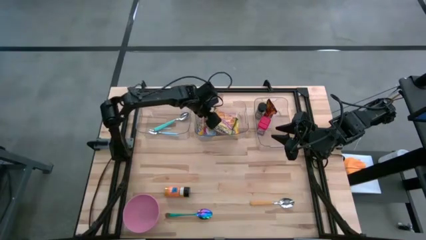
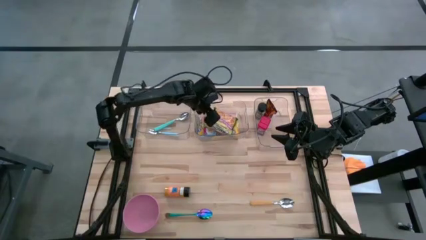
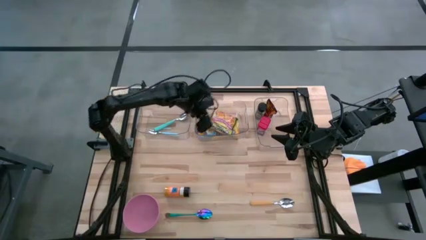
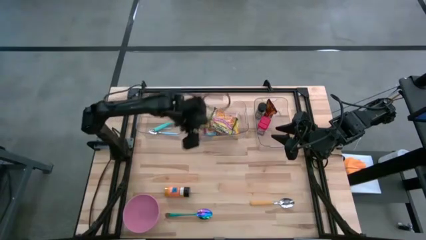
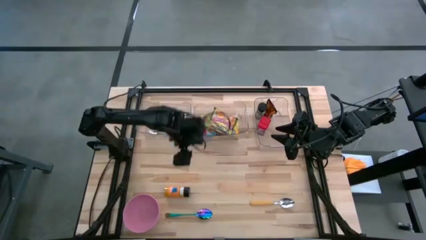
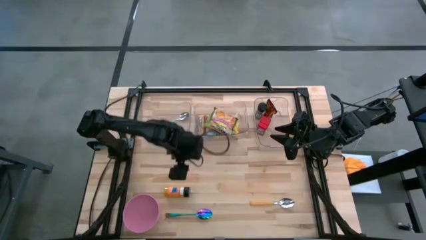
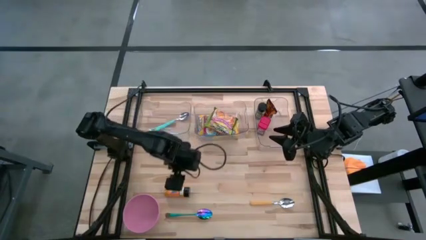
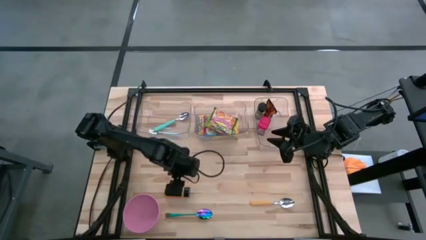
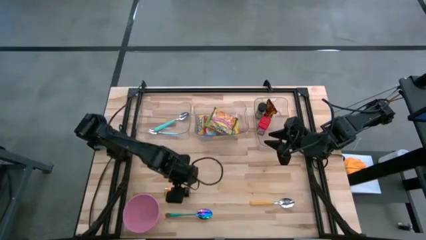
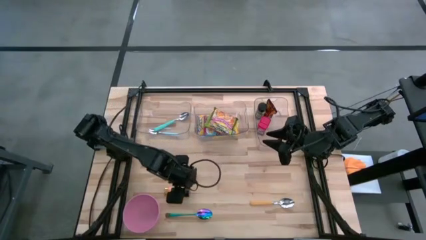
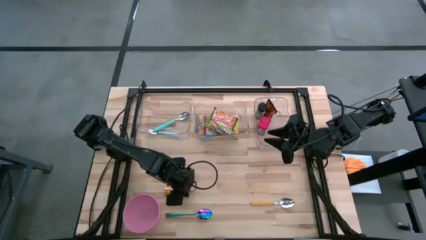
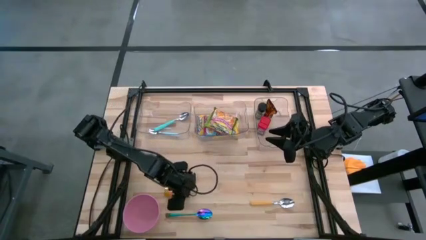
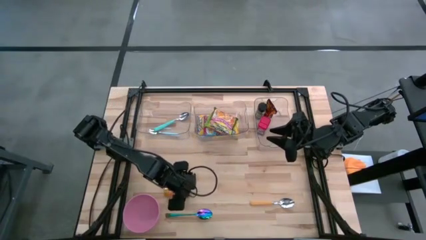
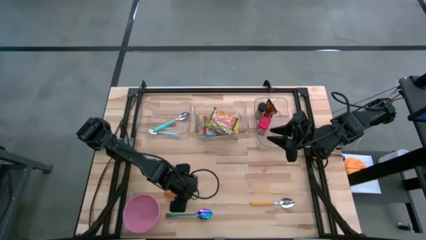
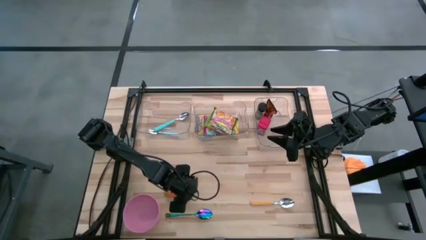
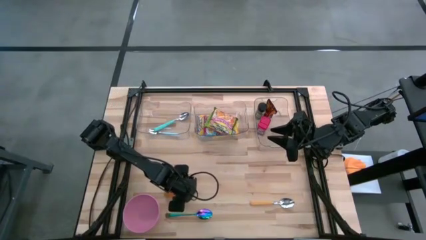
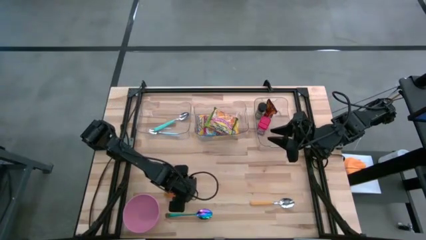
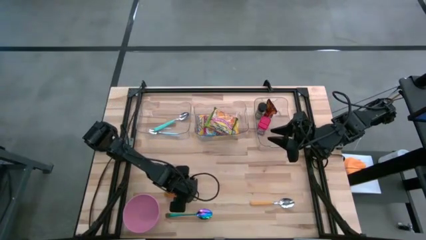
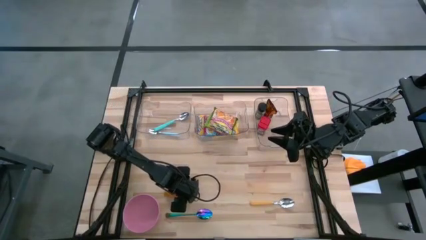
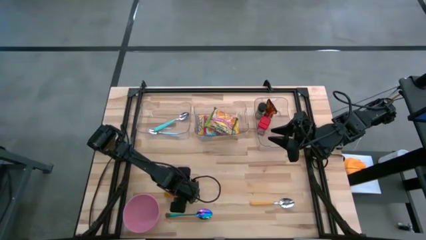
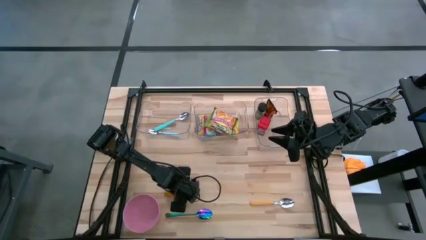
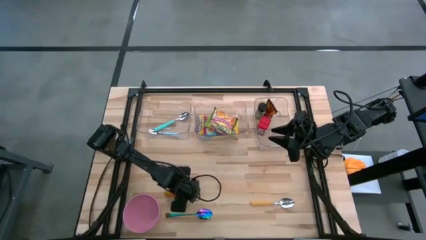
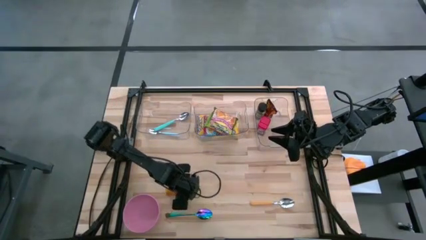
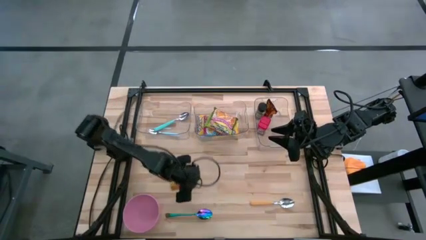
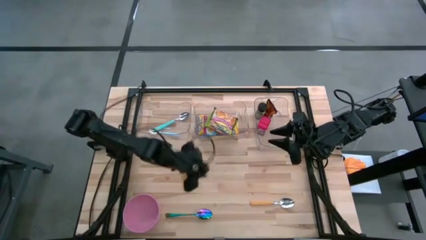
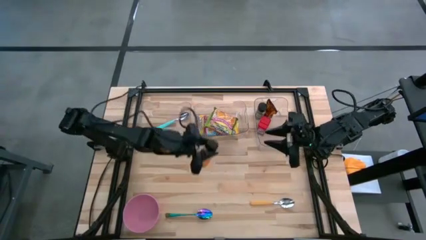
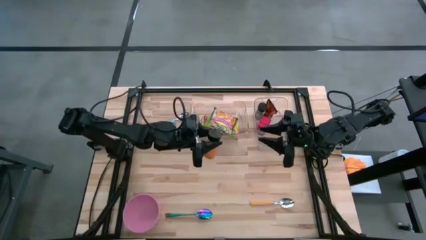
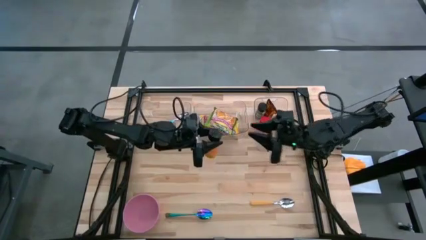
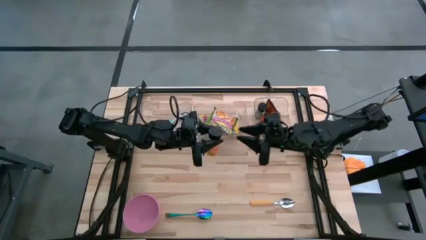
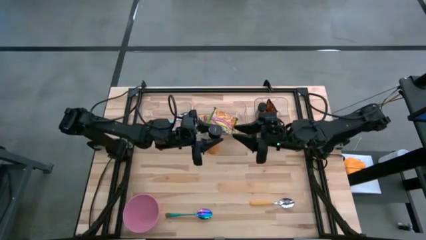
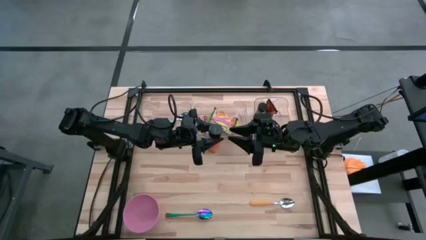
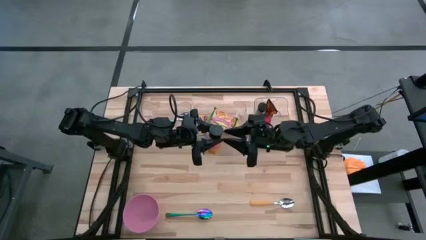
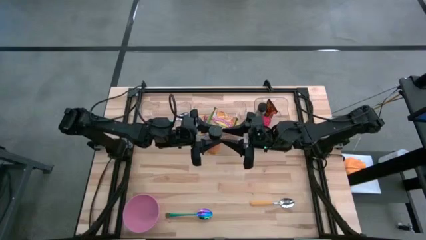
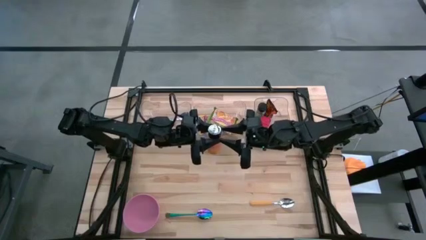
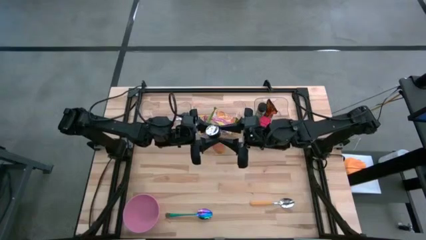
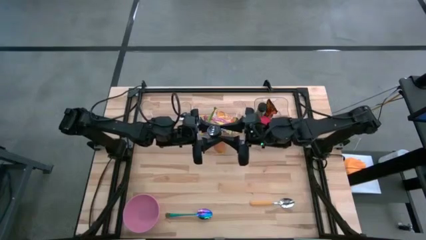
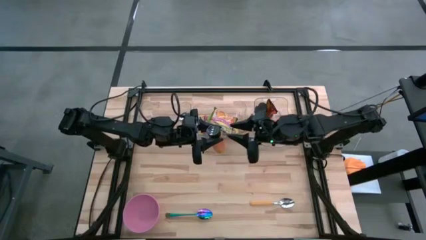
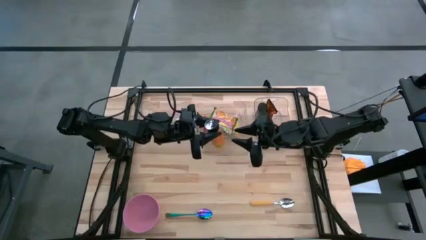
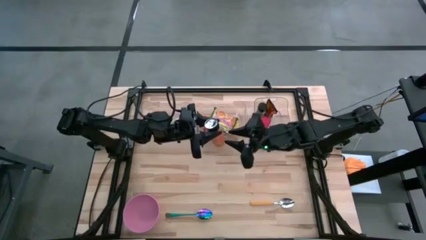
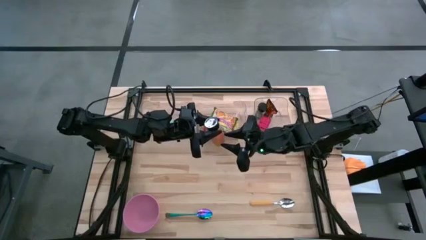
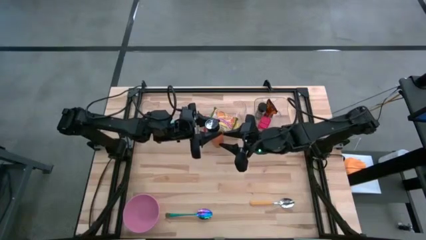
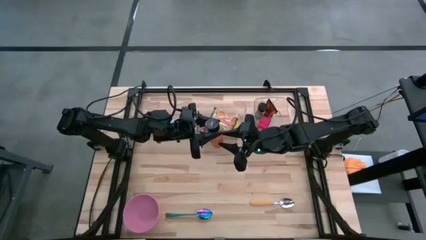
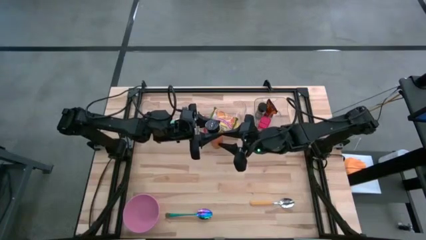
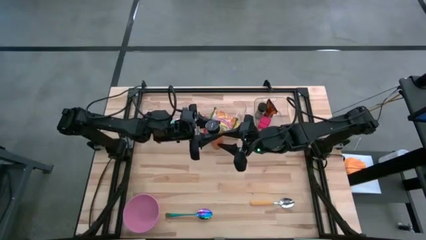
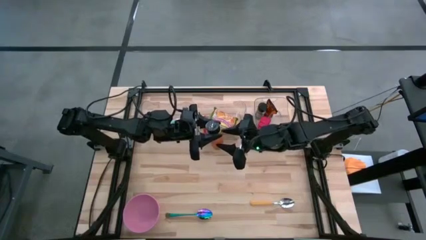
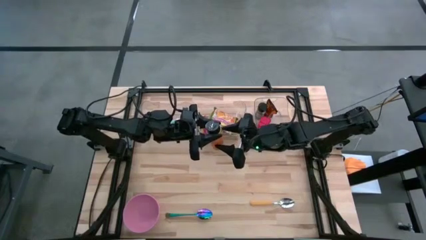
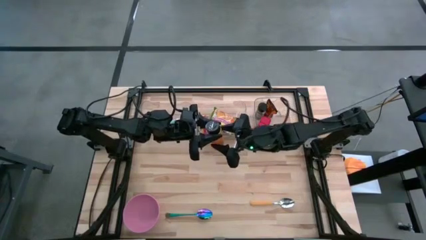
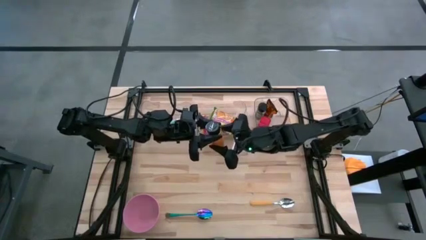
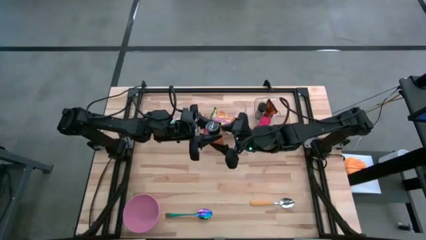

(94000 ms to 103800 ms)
Put the orange seasoning bottle into the right transparent bin

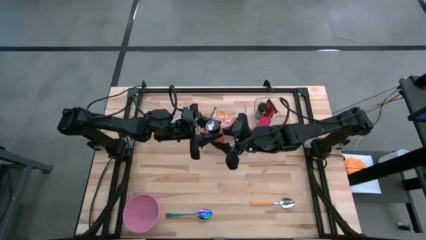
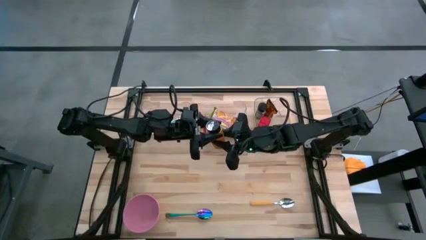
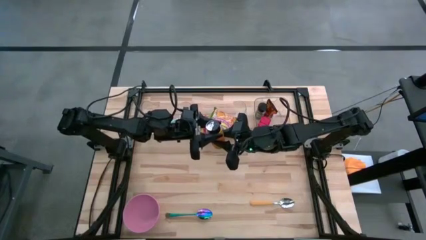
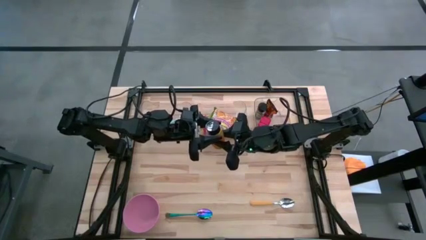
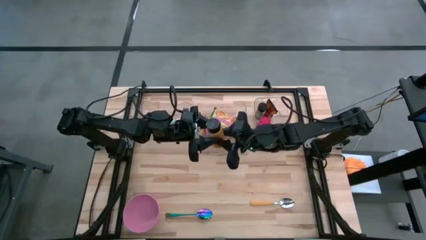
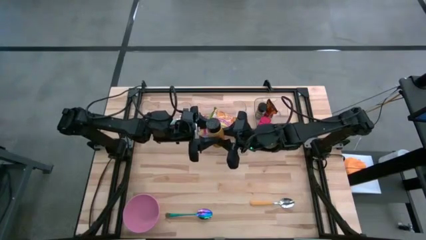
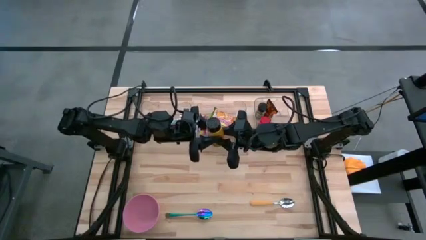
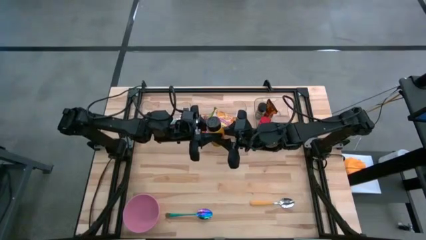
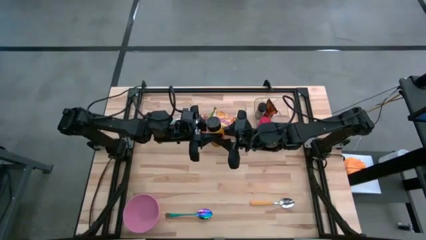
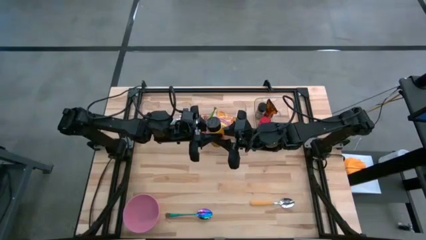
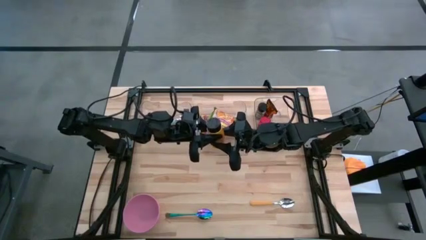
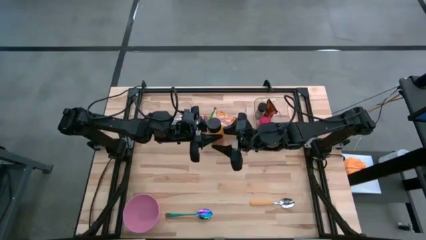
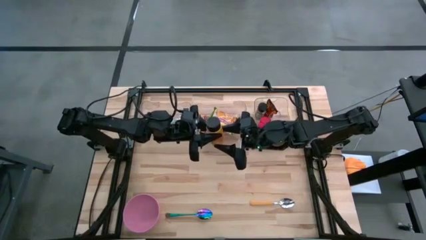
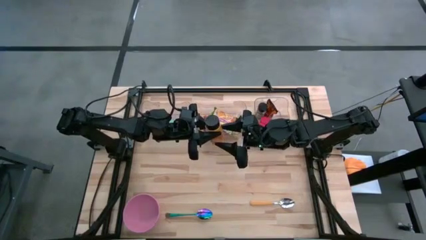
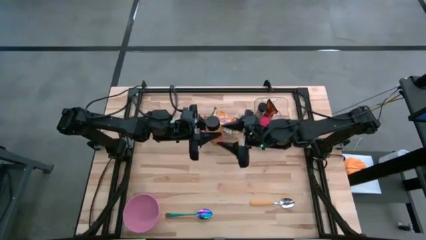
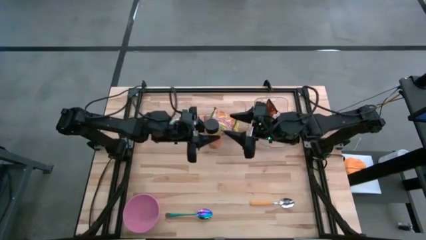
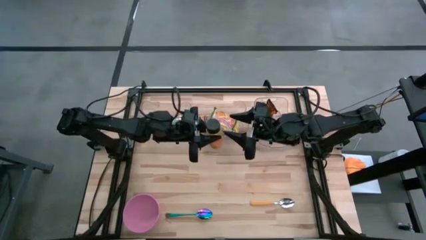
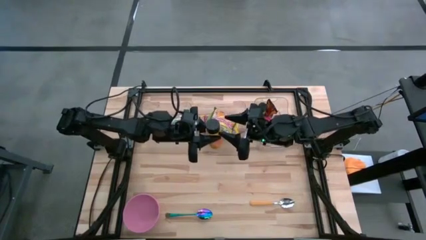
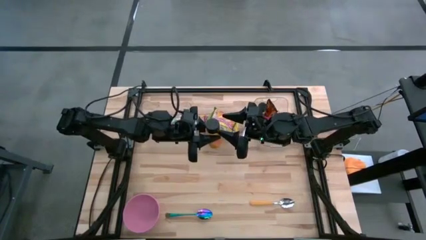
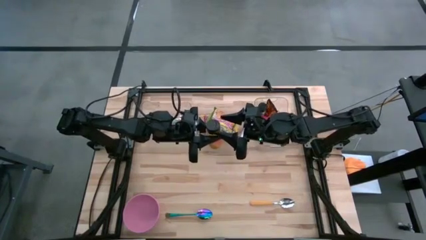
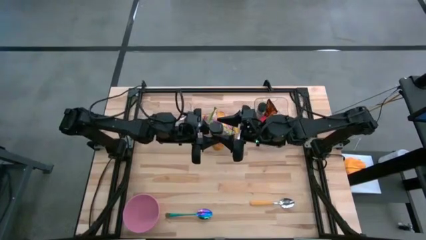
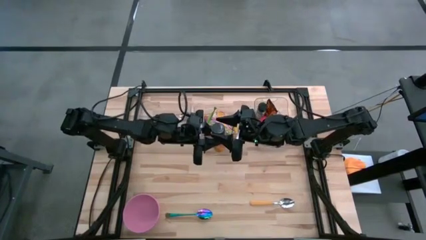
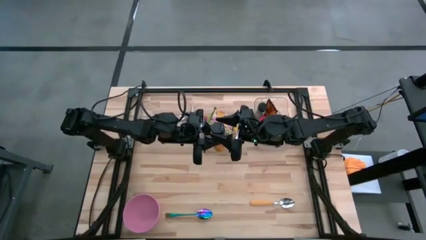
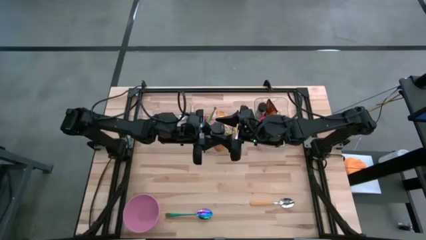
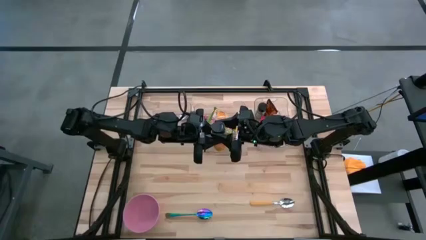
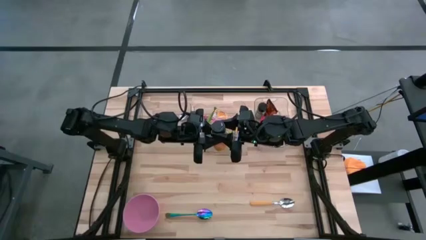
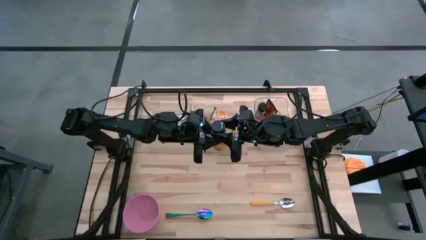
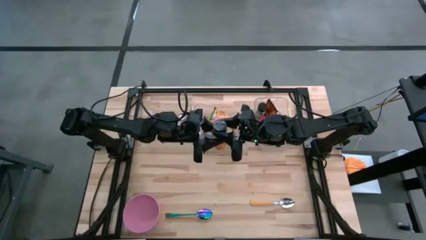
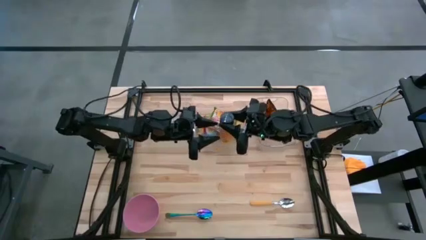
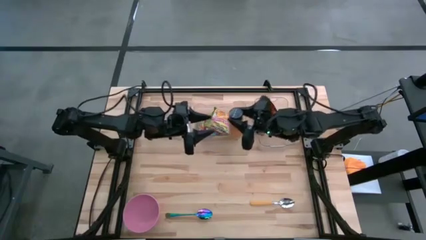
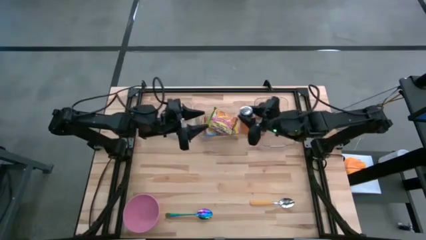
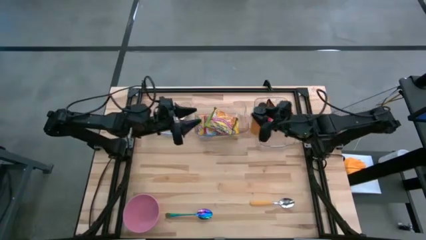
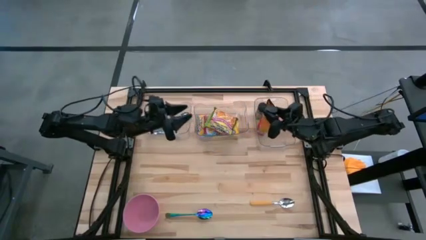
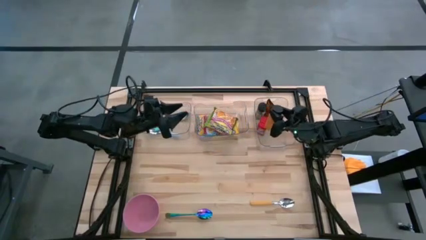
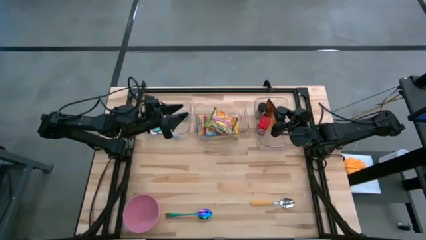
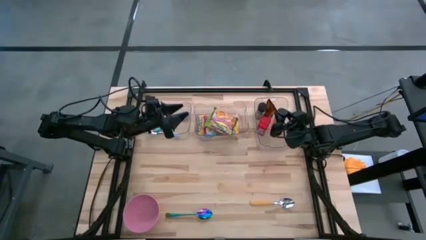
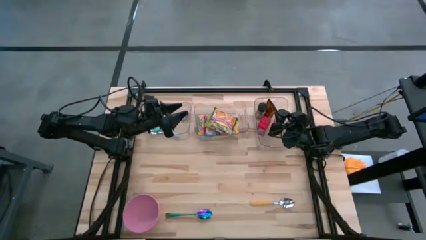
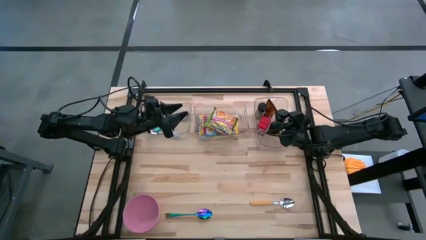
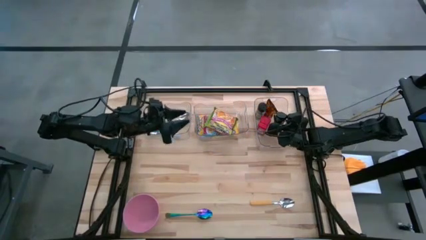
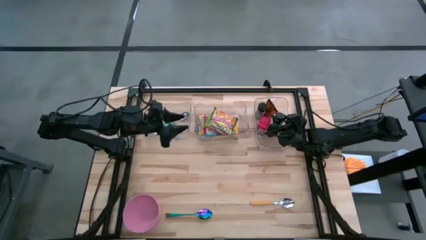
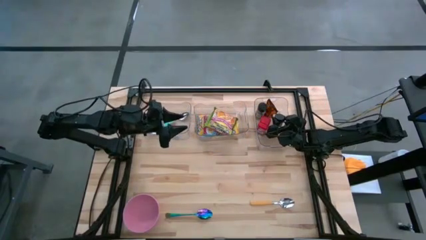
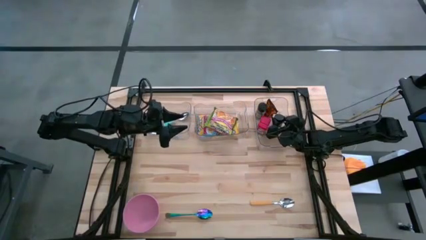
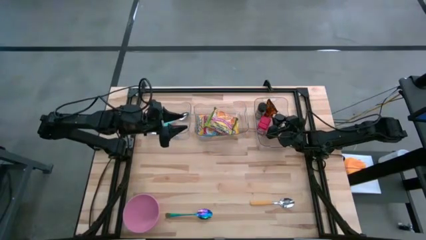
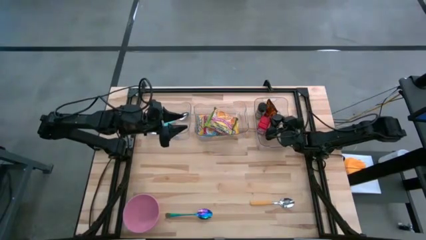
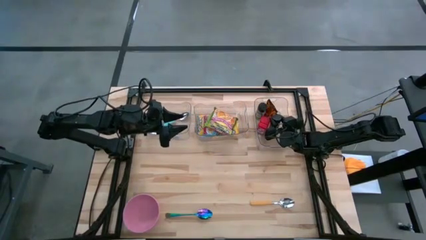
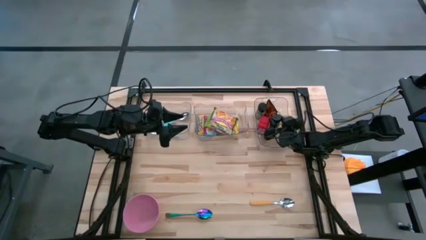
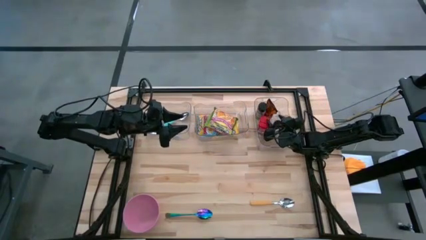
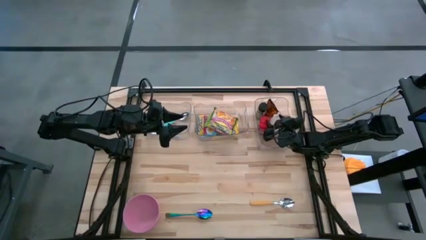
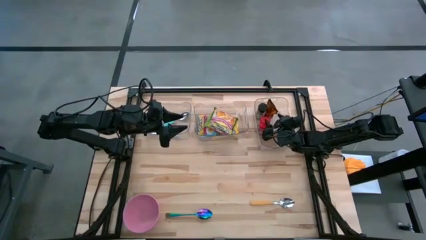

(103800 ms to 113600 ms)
Put the orange seasoning bottle into the right transparent bin
